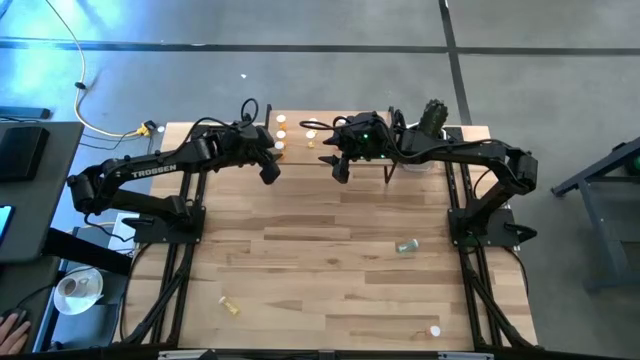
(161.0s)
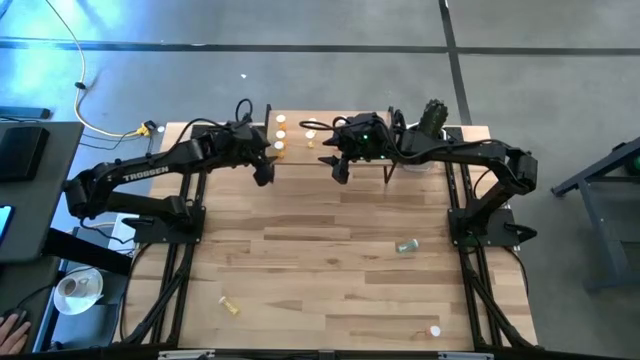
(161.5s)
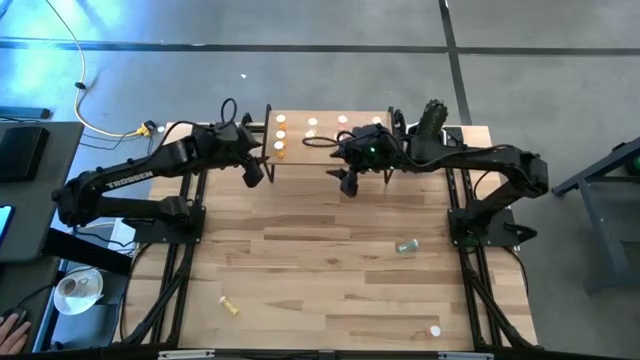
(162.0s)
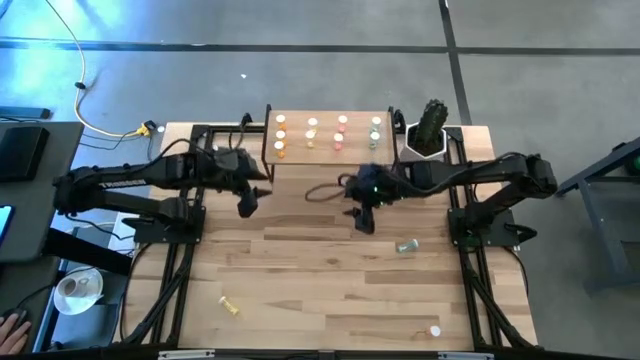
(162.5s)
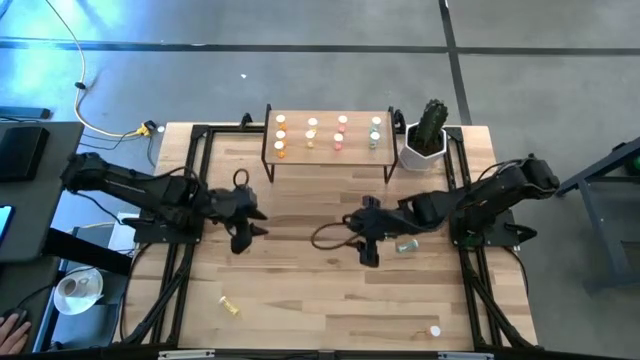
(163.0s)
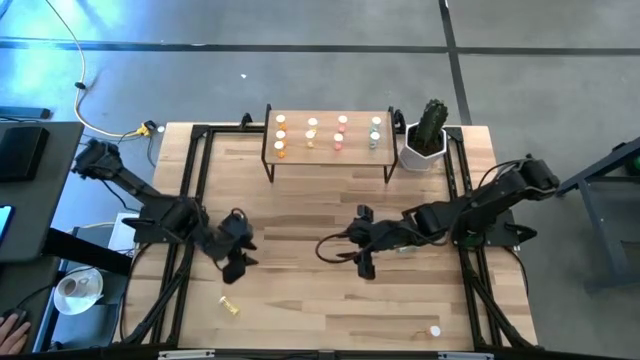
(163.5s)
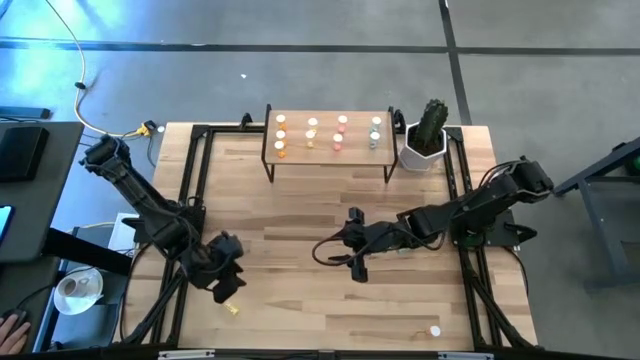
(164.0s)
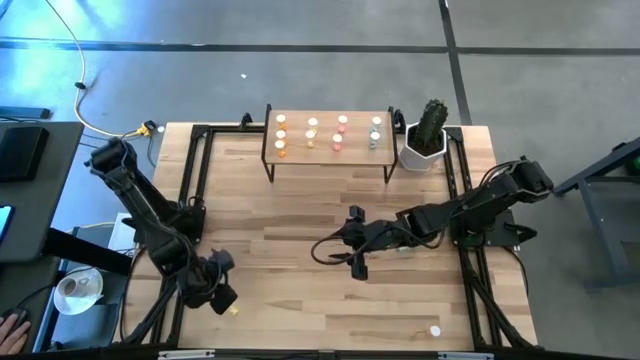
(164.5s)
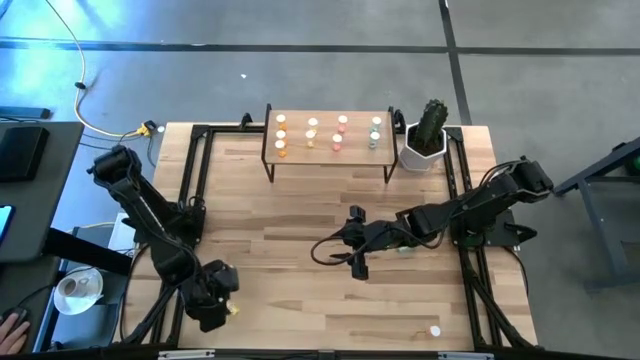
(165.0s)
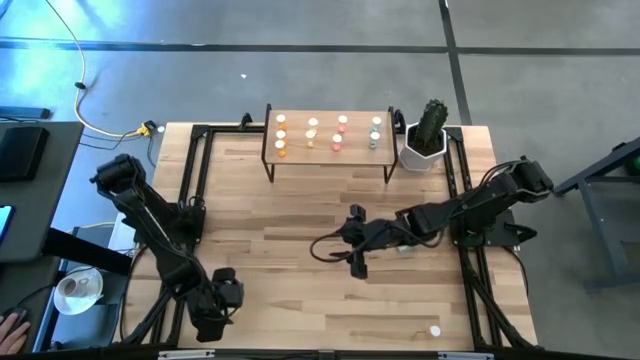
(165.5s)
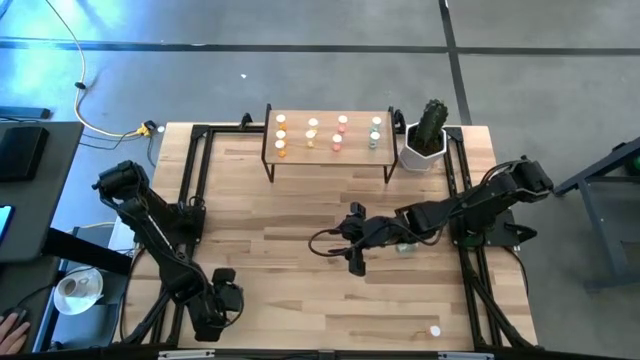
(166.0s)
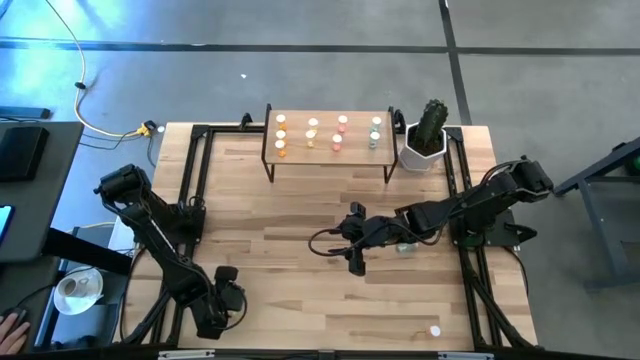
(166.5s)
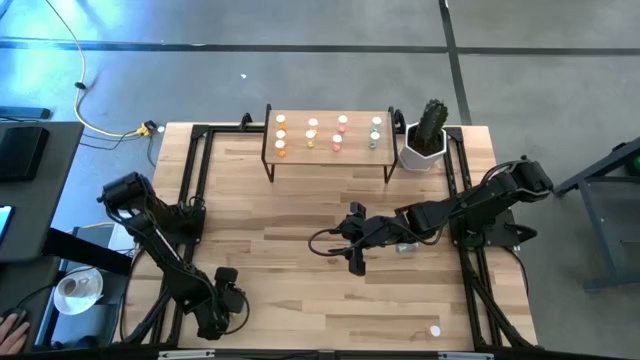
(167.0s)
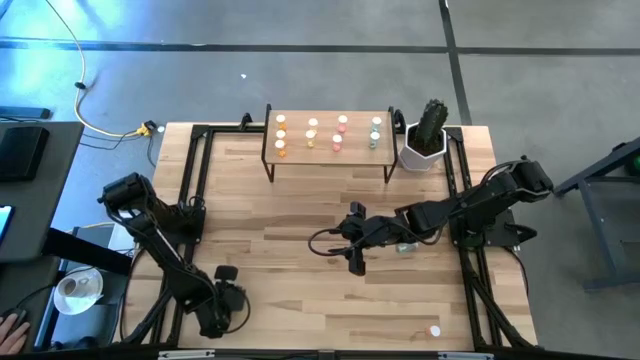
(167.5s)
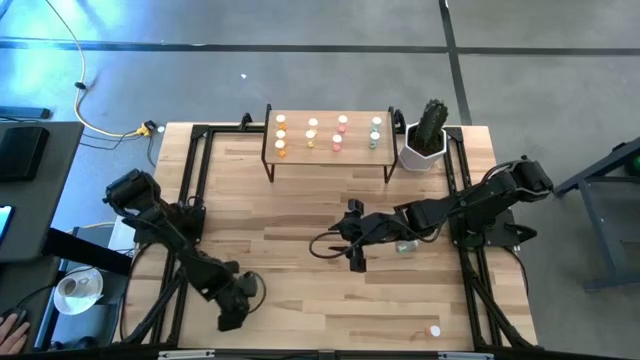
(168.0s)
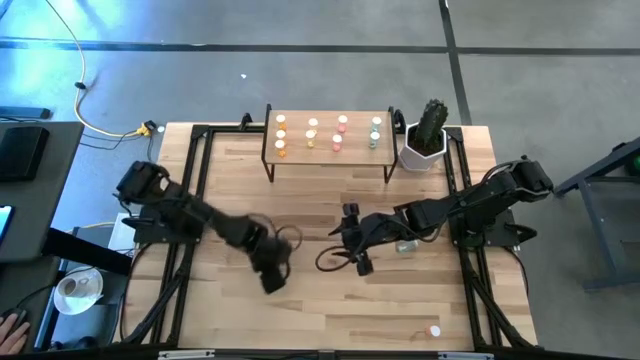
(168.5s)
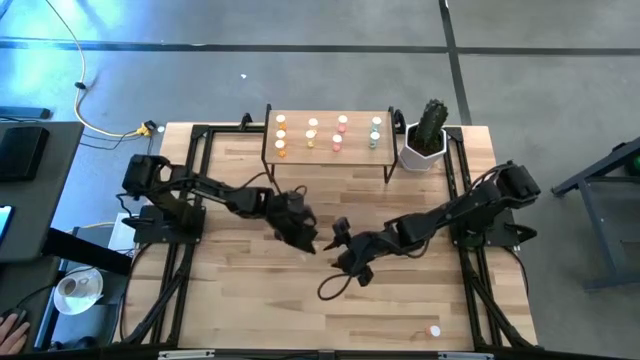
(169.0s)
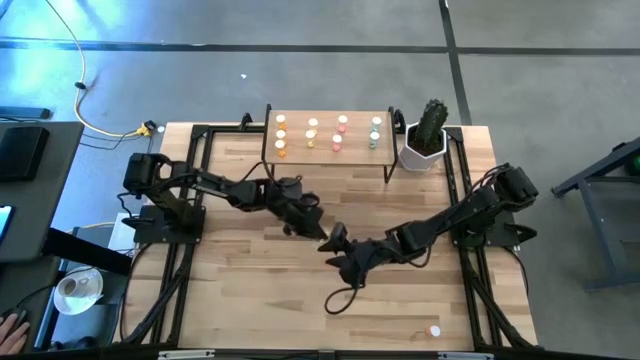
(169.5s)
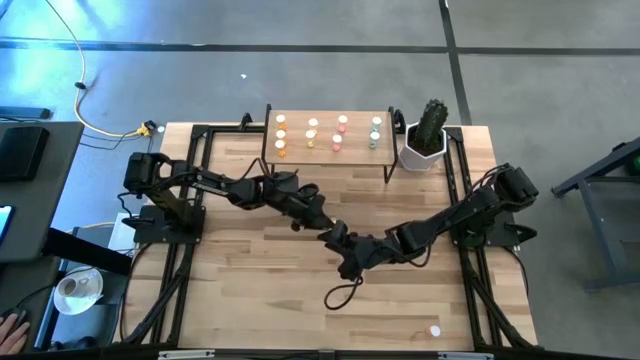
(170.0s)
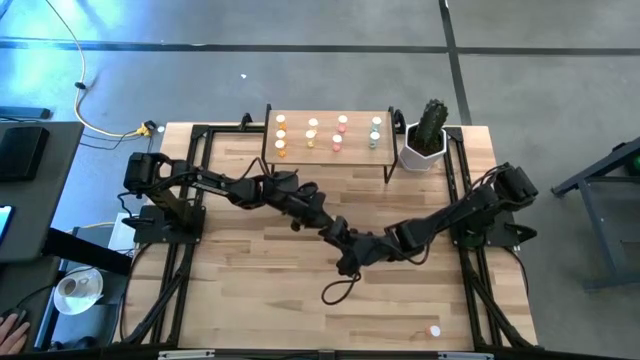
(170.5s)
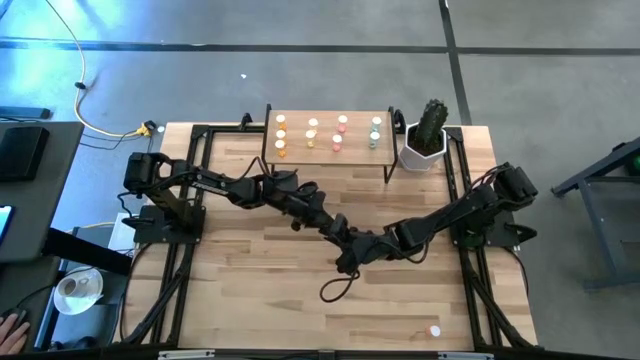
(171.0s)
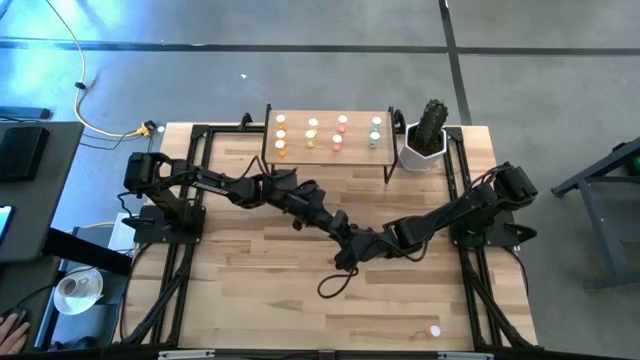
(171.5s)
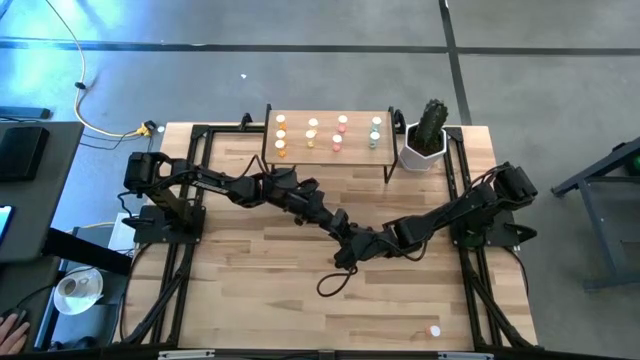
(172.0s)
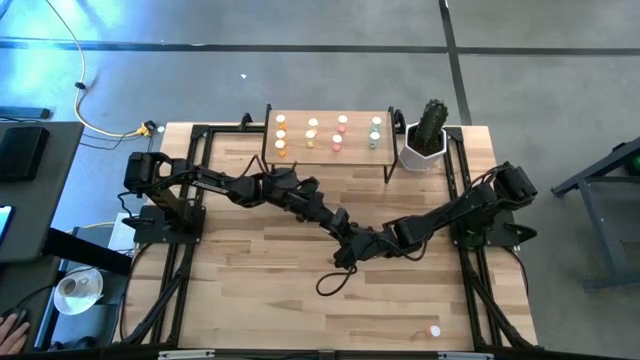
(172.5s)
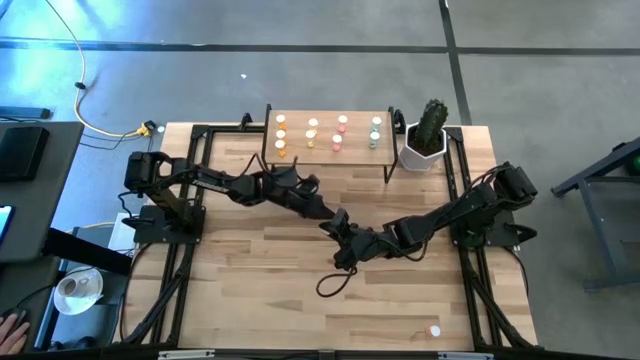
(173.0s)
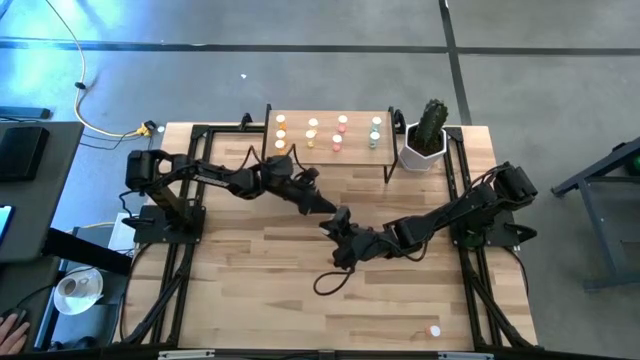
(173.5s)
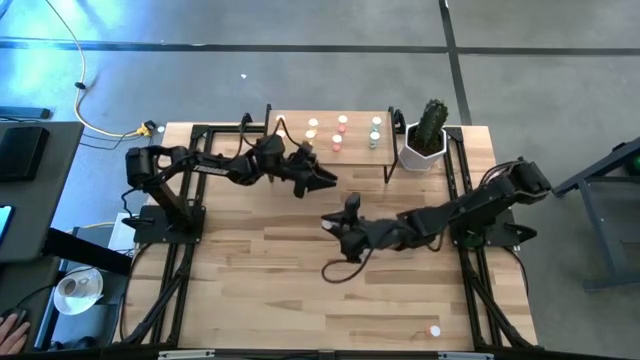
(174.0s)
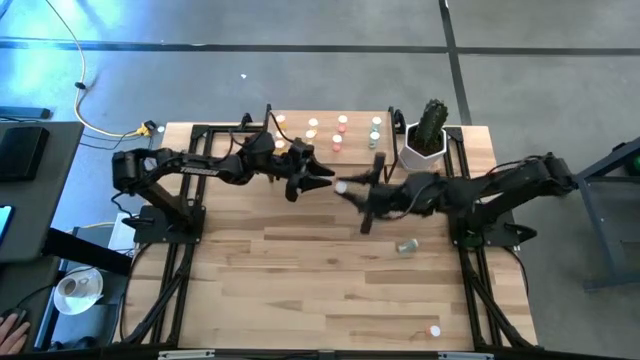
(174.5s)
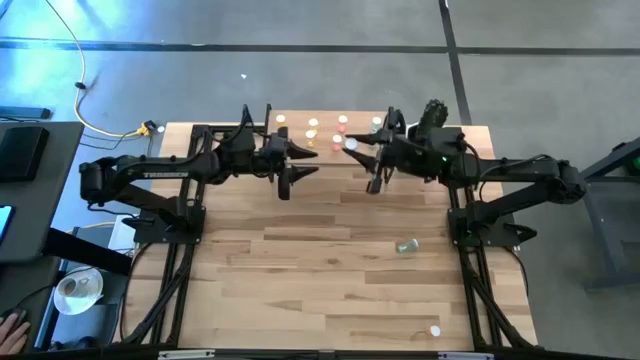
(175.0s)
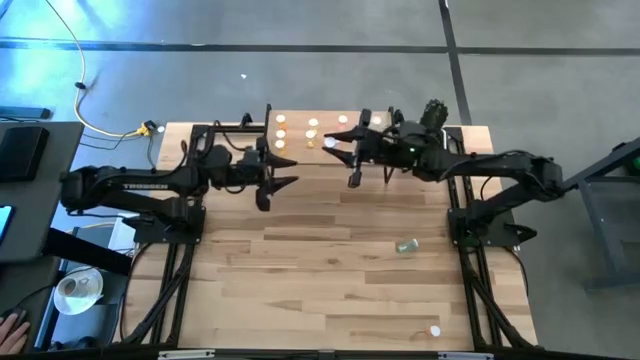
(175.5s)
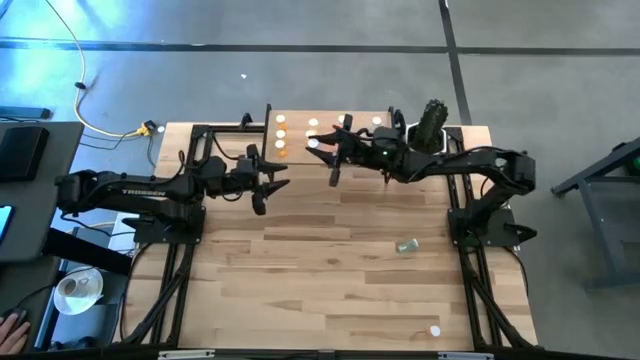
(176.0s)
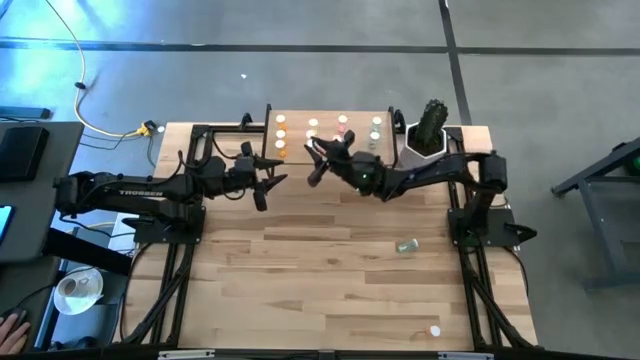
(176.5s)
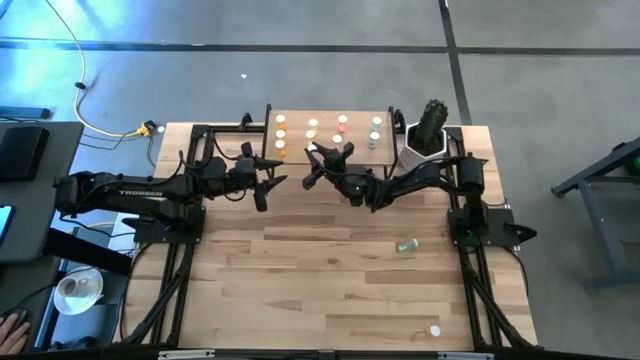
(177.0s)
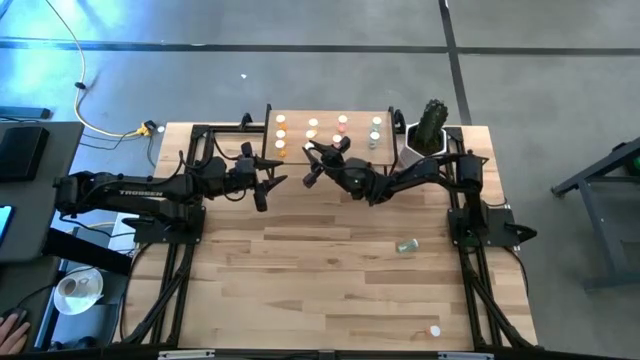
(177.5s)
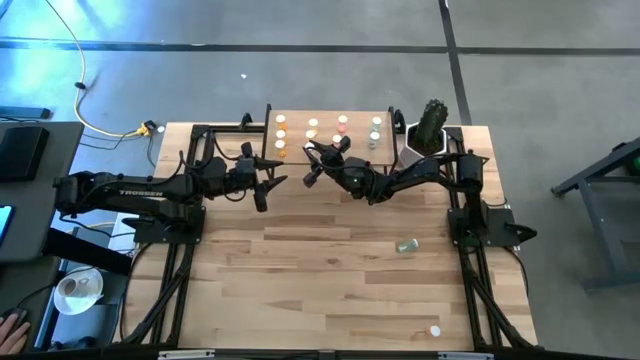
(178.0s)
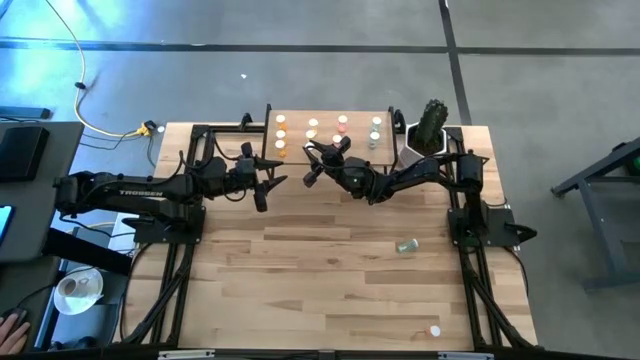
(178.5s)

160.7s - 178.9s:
Task: Pick and place medicine bottles onto shelf by color
Put the yellow pill bottle on the shelf aligned with the other yellow pill bottles
